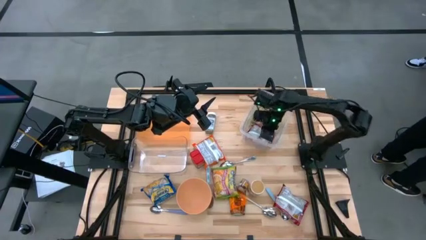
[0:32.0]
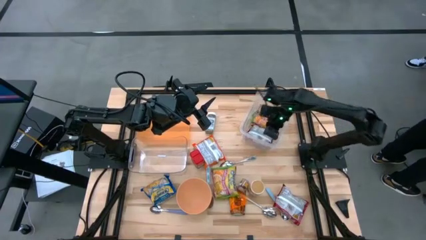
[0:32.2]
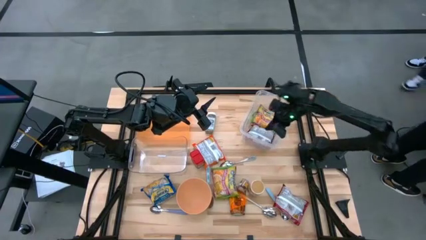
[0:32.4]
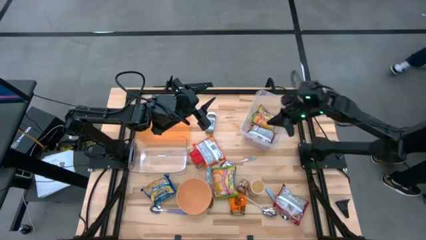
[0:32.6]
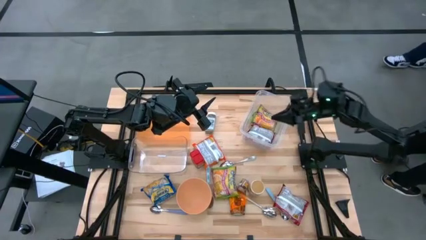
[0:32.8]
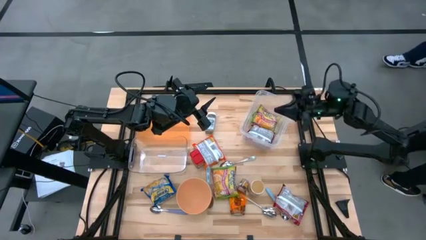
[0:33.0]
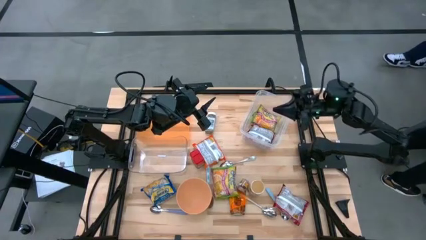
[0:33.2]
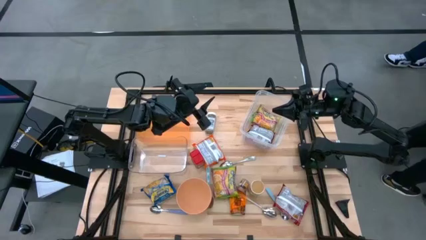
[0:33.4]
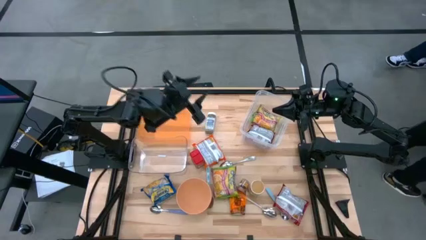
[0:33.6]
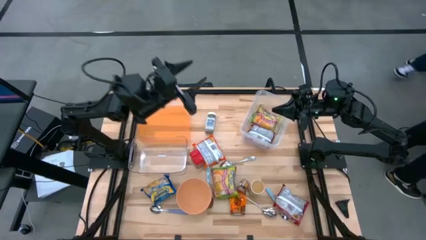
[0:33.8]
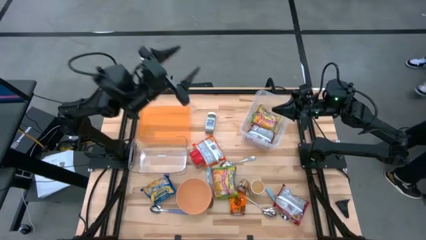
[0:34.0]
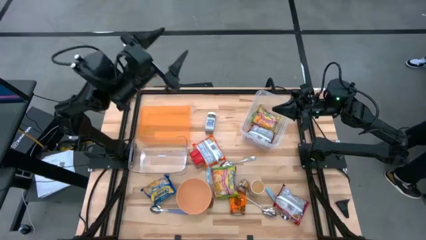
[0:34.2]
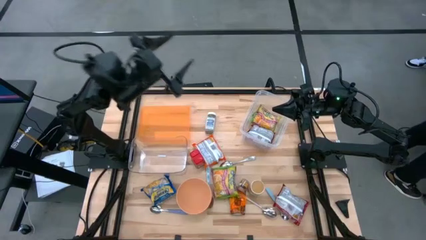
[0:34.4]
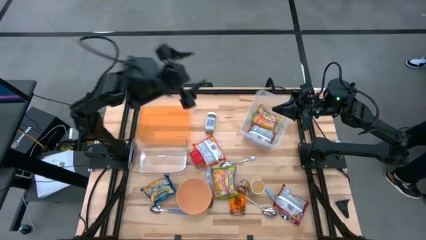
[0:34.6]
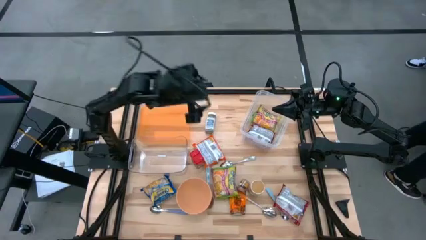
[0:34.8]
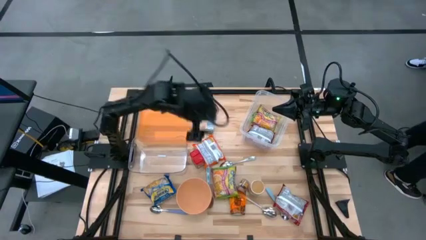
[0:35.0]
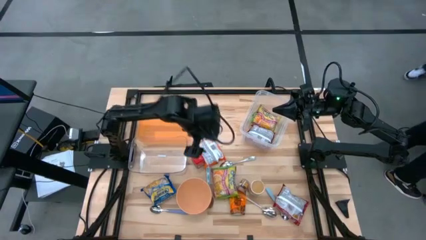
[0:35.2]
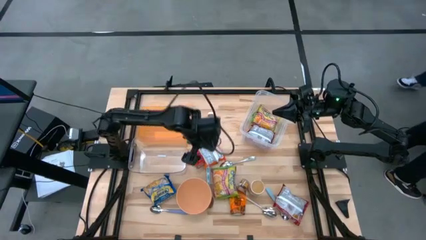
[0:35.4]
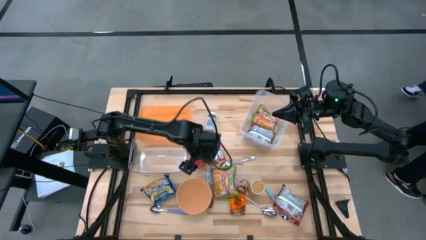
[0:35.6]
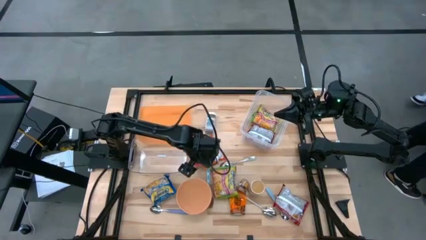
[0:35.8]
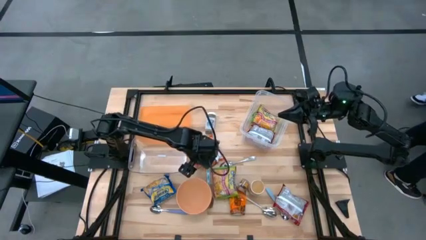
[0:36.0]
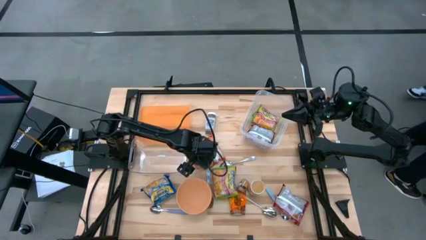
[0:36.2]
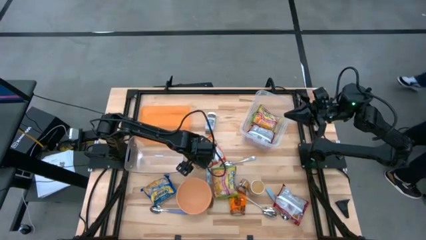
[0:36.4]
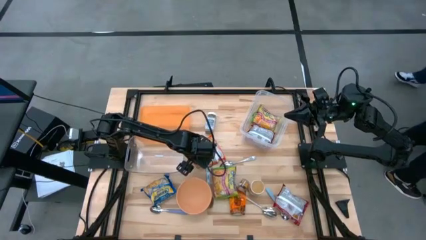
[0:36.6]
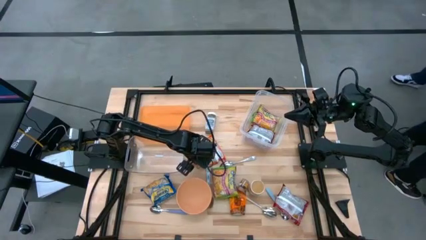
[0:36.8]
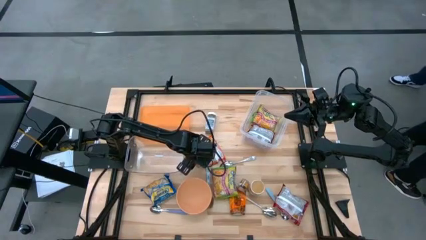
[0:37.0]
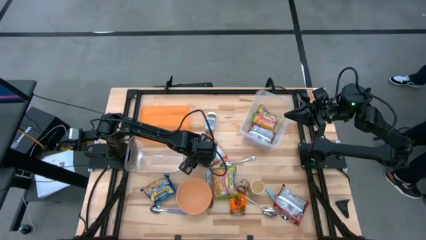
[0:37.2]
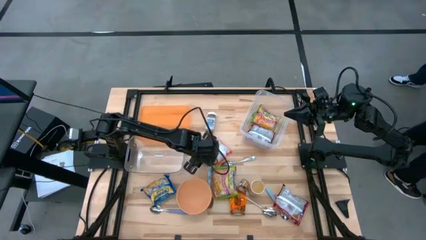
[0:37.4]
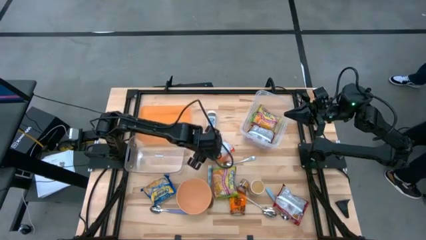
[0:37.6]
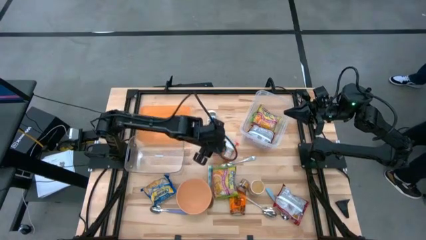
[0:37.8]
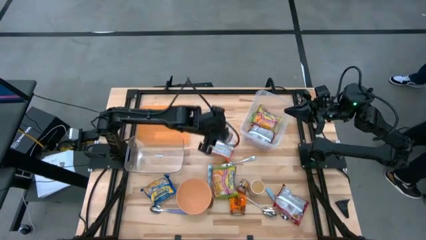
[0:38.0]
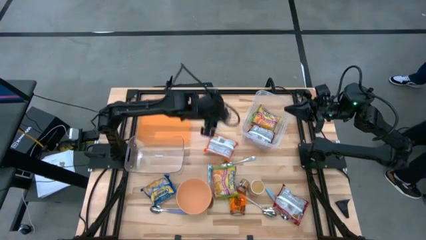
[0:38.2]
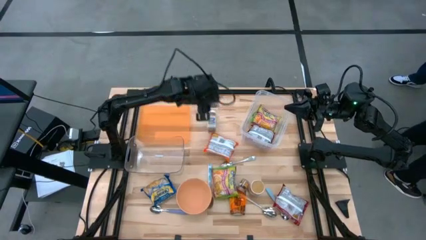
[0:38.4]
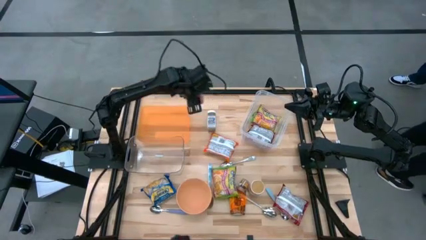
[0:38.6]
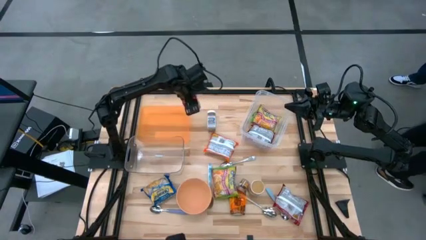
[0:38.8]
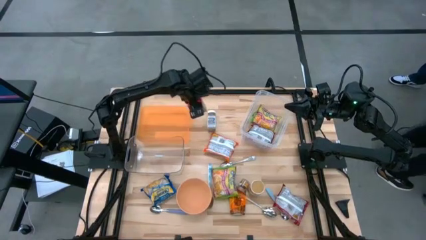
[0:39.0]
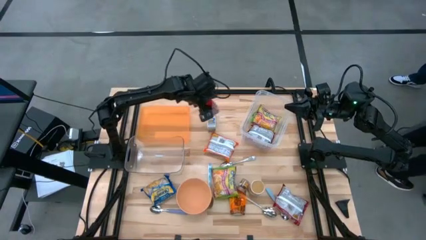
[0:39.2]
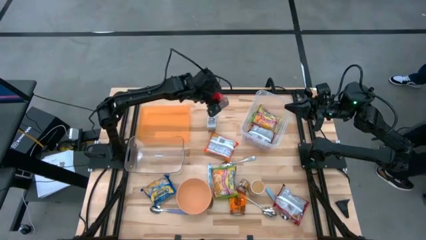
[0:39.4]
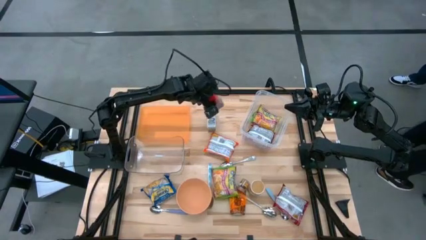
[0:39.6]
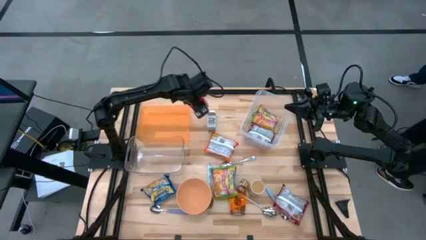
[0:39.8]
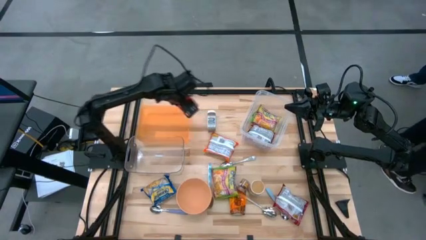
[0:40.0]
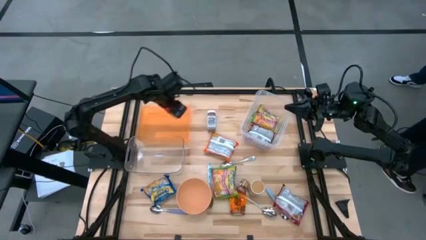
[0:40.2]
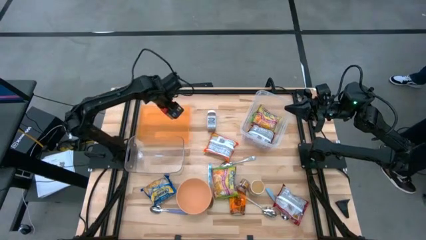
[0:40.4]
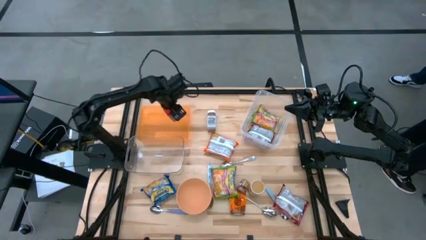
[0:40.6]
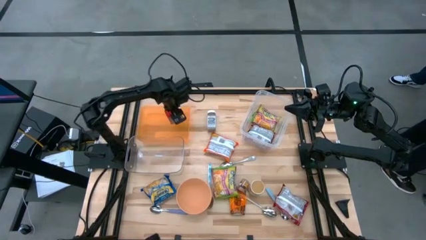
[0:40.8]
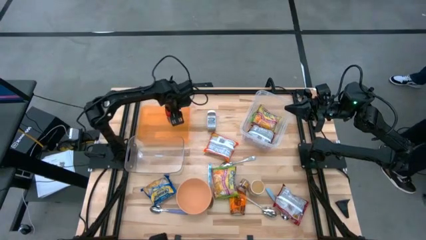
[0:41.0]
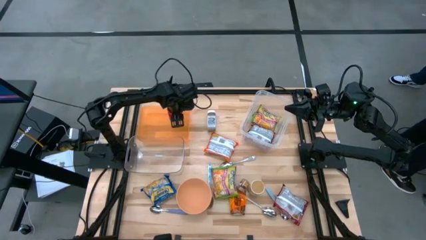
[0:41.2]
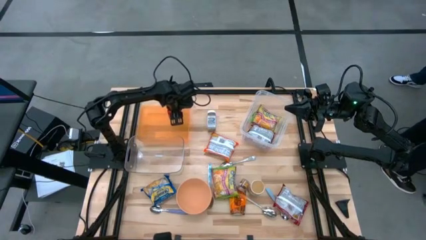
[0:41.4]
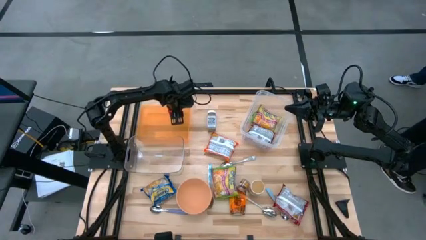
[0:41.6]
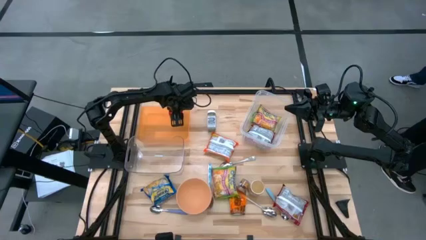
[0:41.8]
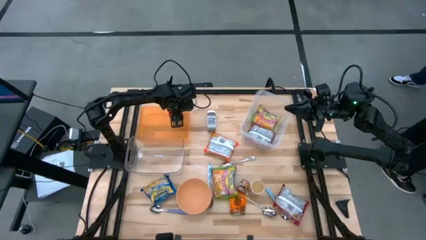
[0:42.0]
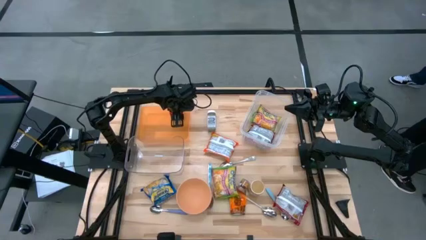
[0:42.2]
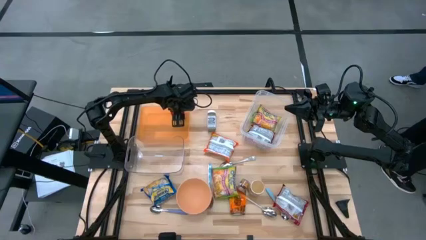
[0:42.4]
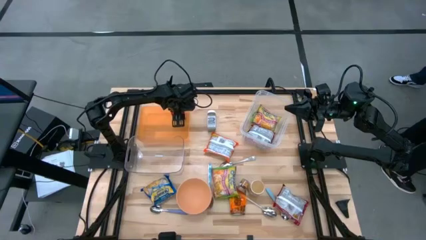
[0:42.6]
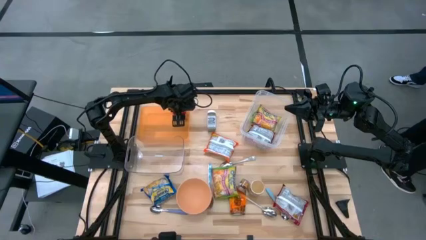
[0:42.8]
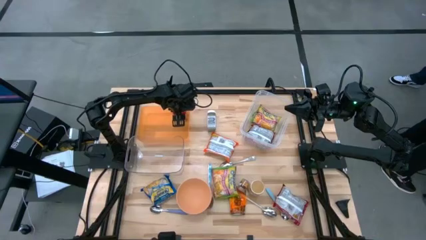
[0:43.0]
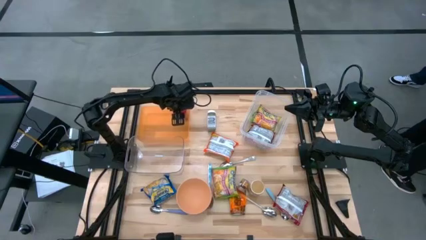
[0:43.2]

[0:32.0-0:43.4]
Task: Pick & Place Food Item
Put the red seasoning can into the orange bin
